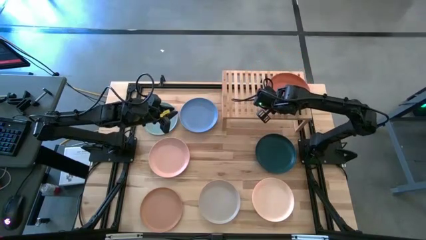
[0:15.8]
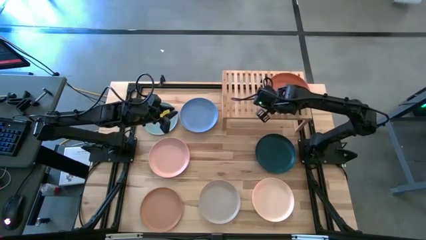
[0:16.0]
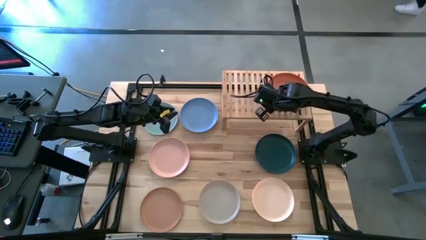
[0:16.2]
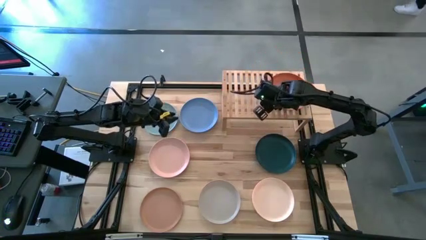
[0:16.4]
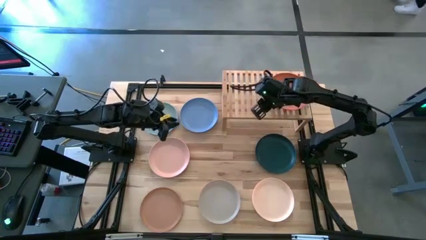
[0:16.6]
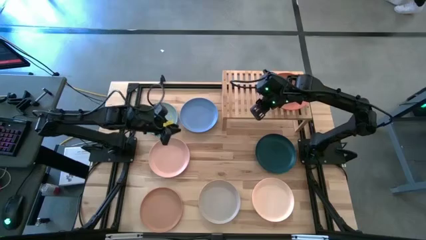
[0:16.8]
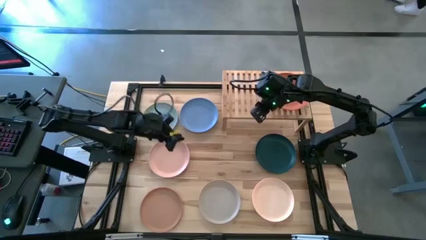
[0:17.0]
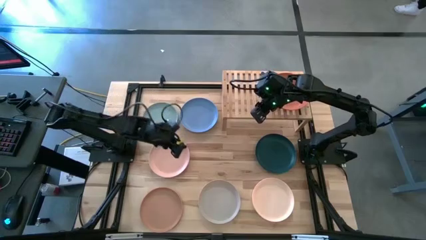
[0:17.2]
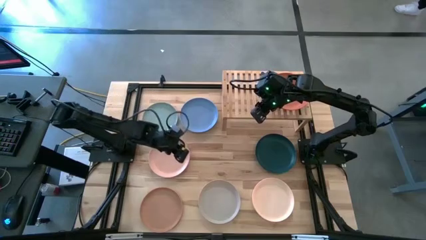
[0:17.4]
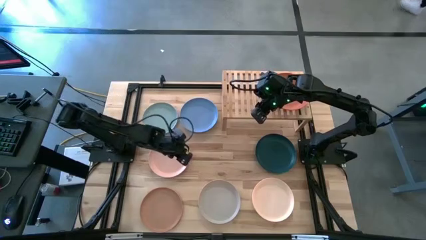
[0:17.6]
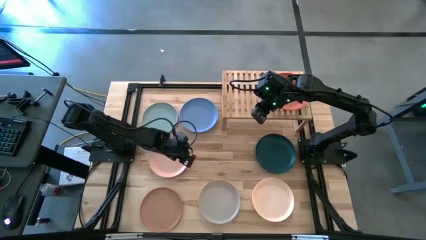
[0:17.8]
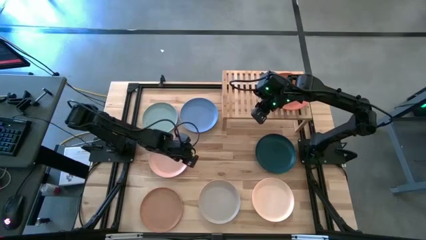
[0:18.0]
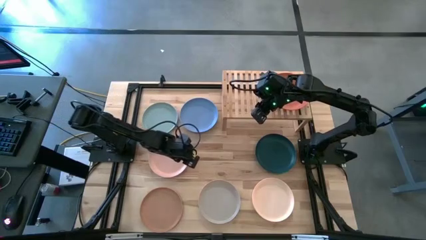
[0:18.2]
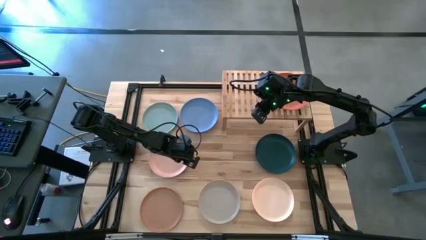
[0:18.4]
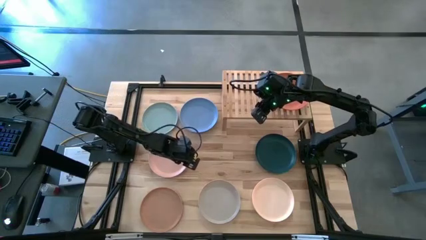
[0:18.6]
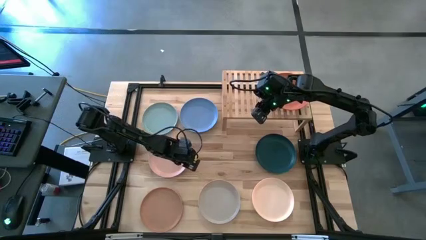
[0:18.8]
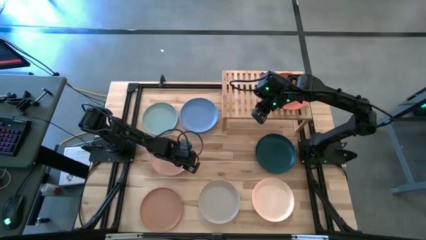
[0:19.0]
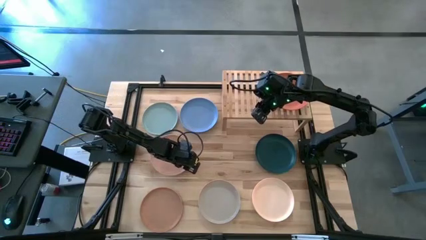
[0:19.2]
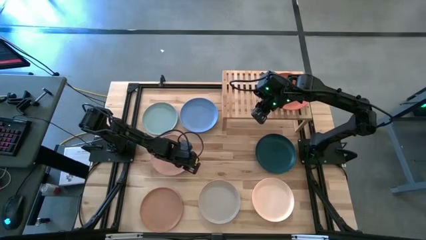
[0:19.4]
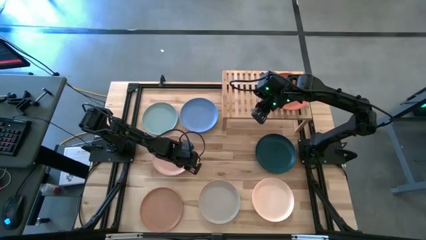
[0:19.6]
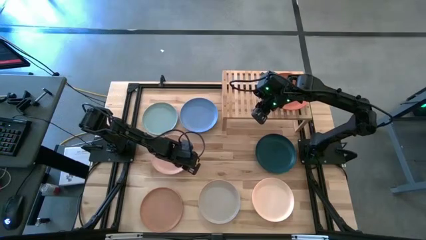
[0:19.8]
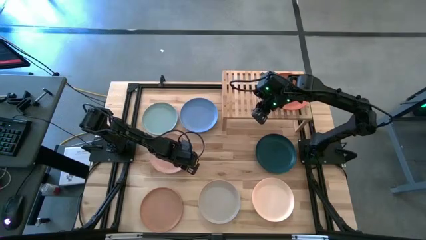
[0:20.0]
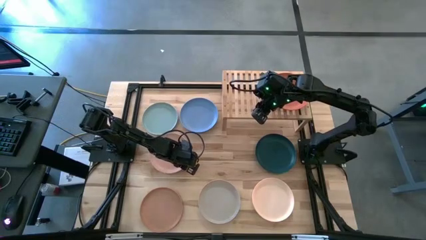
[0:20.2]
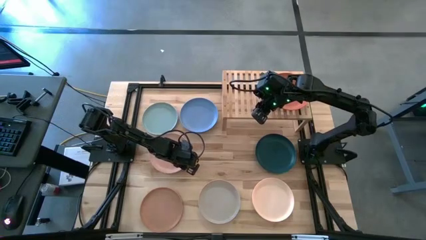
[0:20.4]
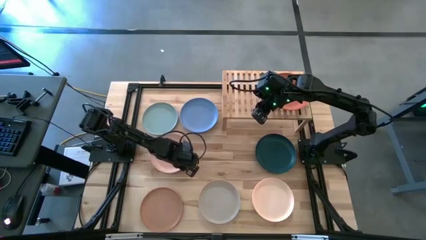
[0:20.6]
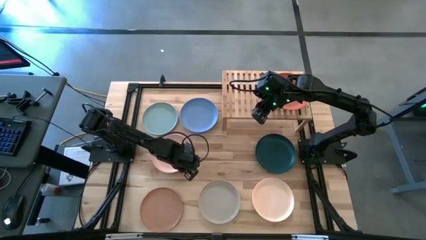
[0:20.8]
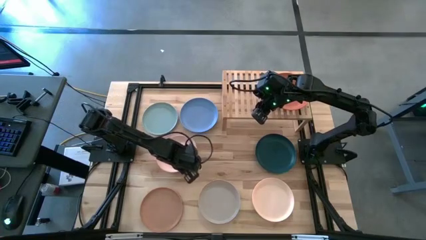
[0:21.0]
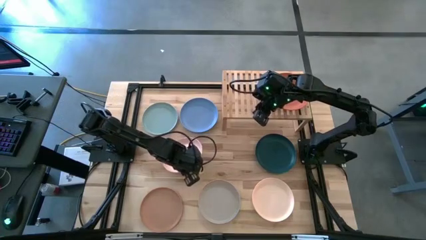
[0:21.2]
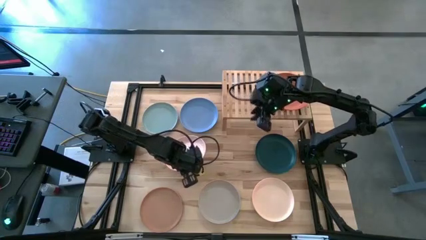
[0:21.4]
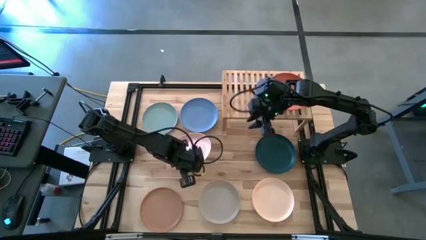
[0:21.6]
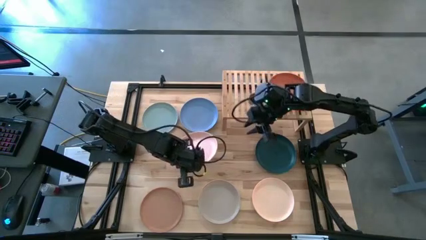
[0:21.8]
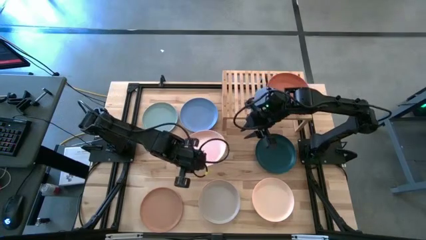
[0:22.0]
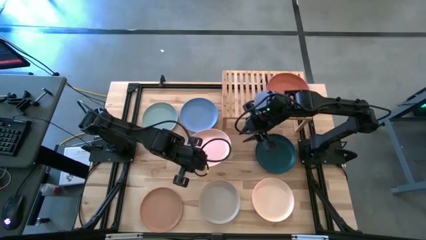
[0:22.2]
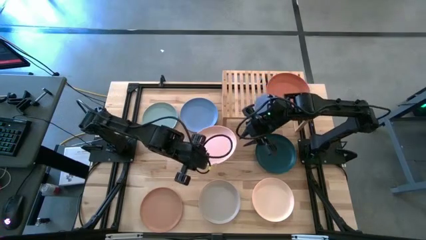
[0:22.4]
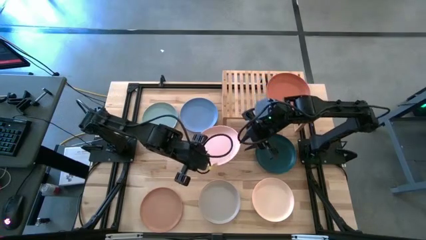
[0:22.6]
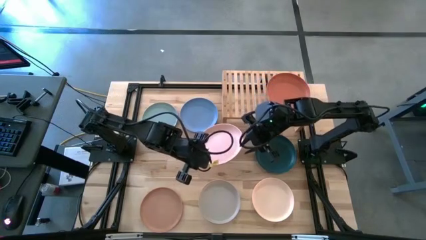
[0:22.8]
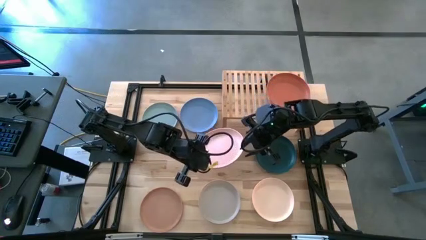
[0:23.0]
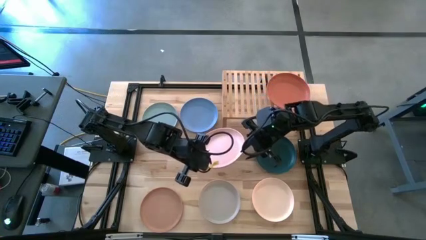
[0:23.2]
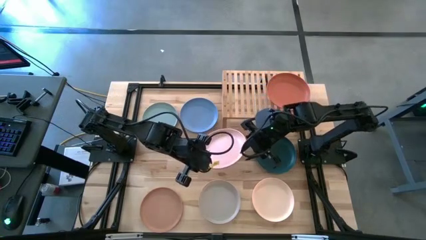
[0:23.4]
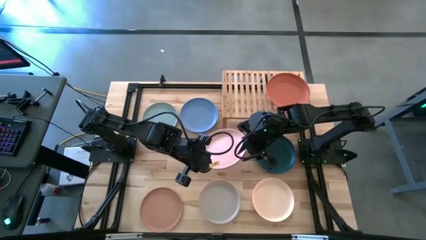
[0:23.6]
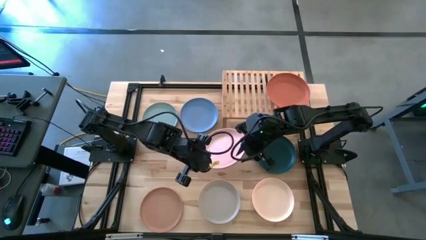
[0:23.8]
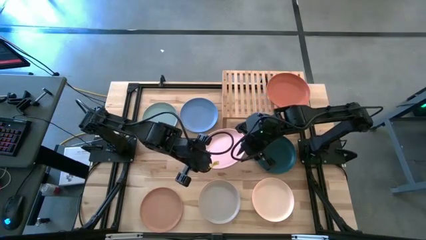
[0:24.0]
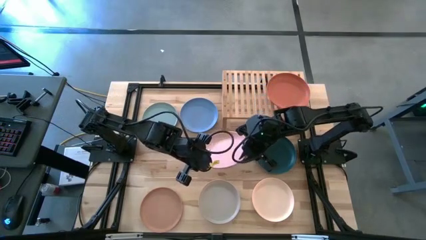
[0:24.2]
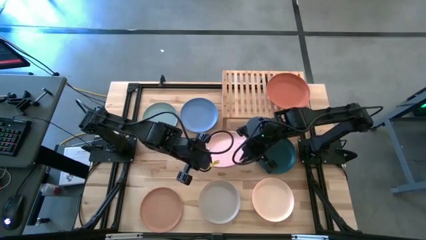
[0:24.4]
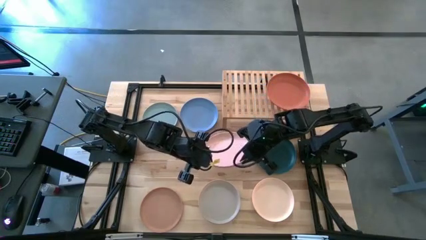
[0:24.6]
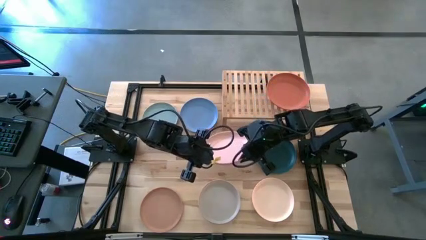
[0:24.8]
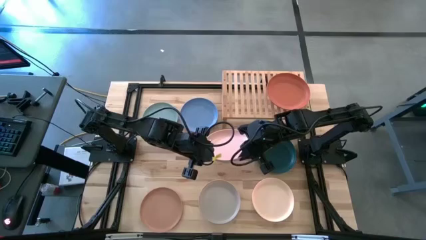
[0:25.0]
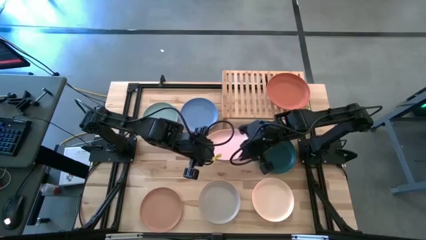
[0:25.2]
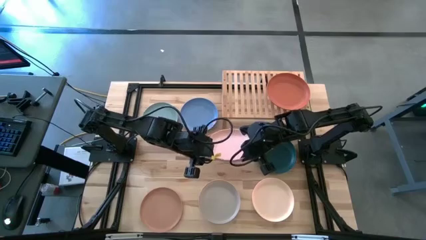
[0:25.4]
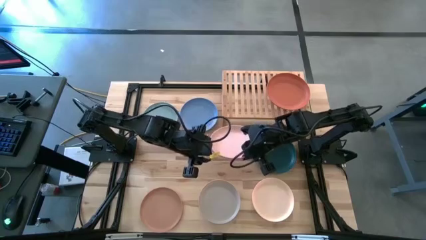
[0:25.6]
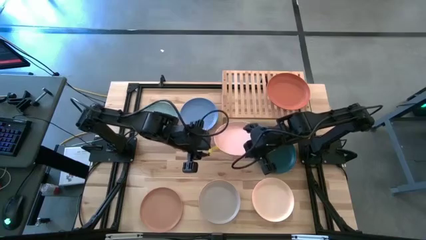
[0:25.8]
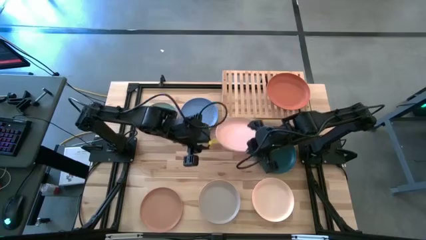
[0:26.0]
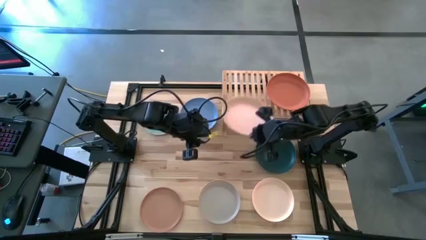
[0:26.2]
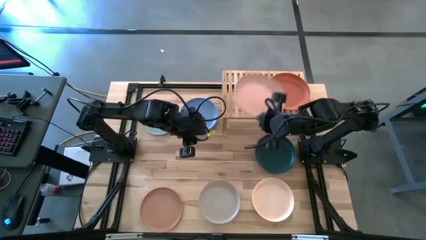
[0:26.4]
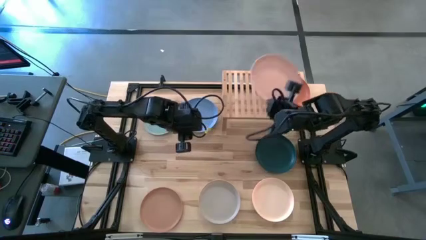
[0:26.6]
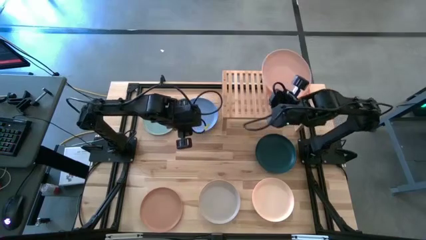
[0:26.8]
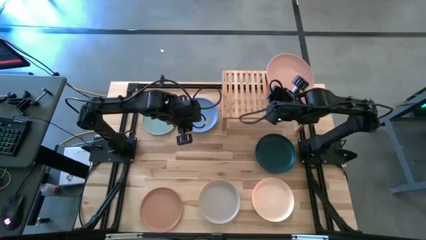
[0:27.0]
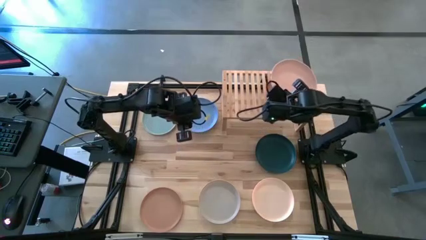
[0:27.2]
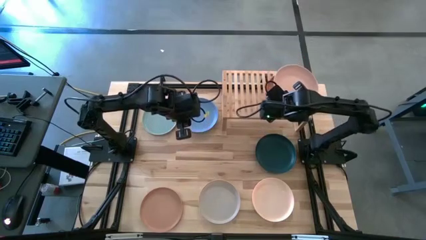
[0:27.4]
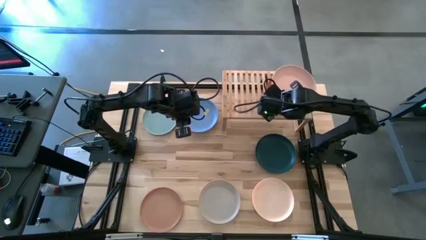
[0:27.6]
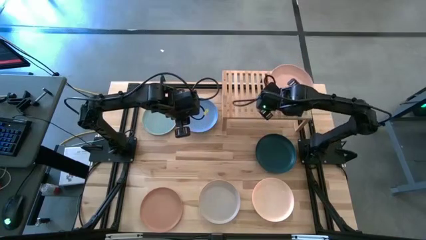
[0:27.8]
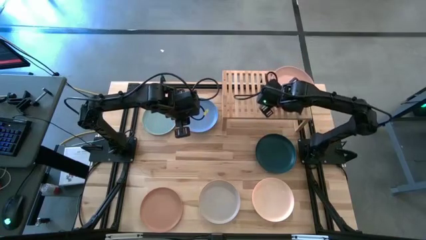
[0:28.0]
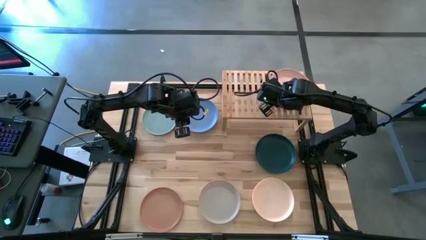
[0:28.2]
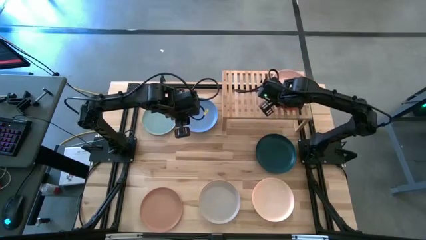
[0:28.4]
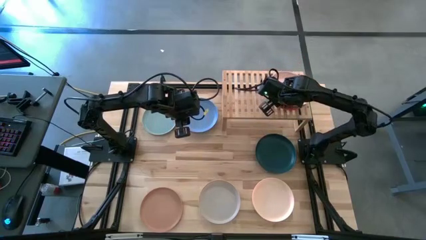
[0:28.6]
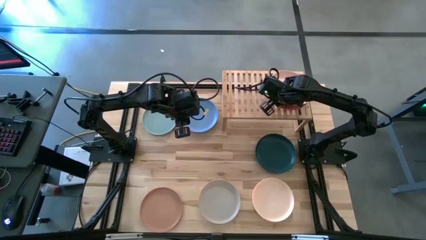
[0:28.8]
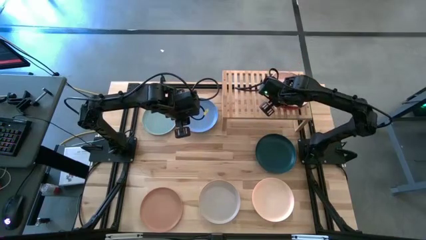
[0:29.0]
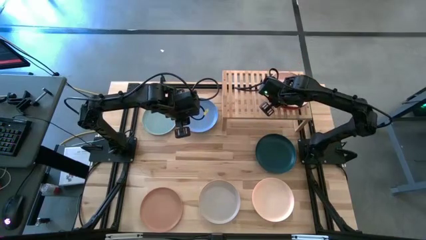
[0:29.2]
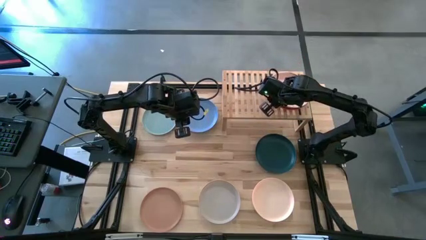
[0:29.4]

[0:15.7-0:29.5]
Task: Place and stack plates onto a shelf
Stack the light pink plate on top of the orange plate onto the shelf
